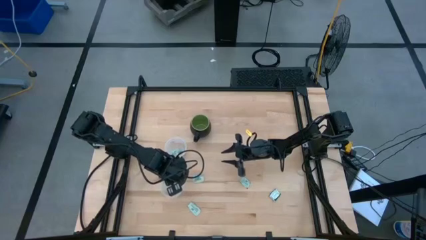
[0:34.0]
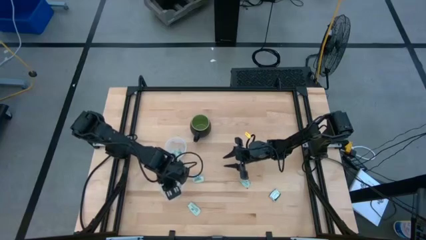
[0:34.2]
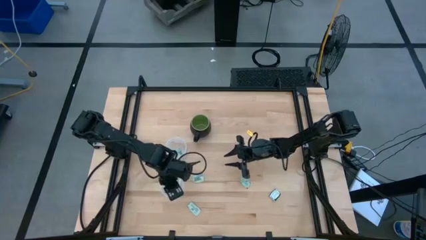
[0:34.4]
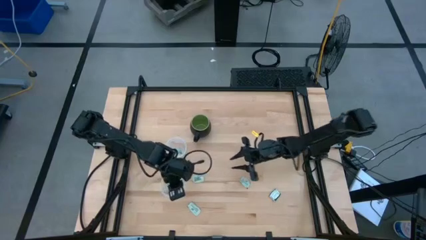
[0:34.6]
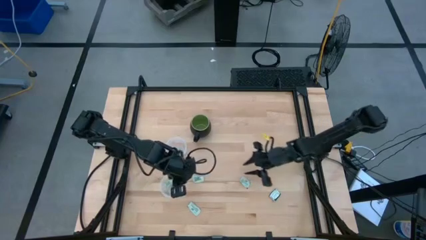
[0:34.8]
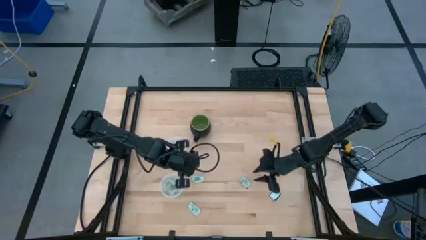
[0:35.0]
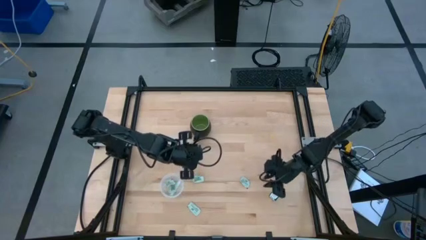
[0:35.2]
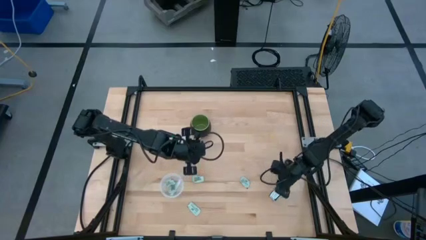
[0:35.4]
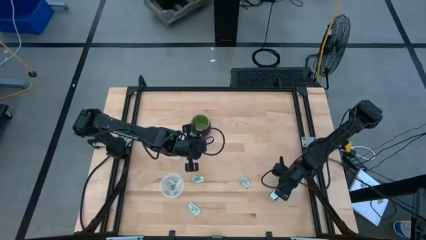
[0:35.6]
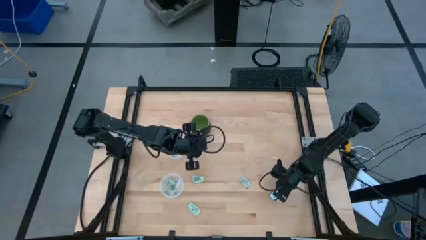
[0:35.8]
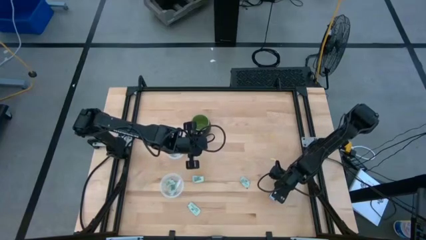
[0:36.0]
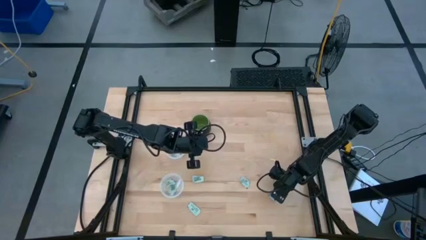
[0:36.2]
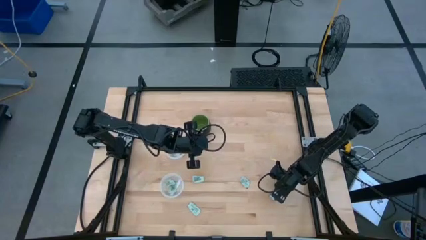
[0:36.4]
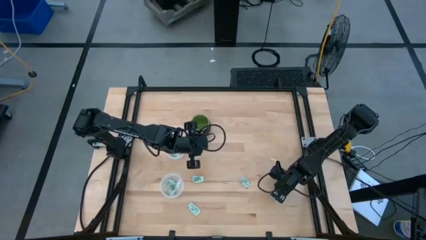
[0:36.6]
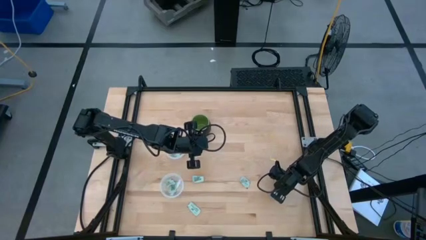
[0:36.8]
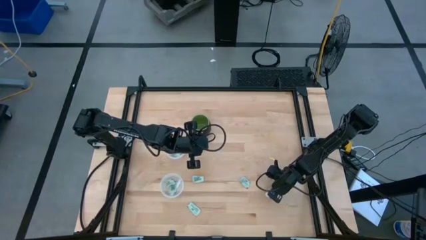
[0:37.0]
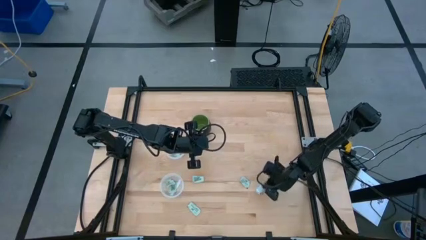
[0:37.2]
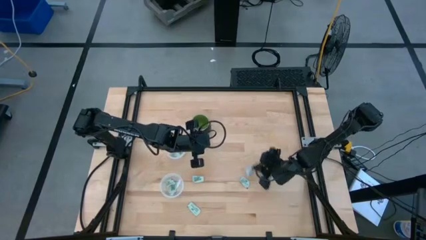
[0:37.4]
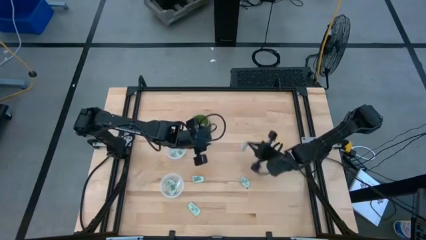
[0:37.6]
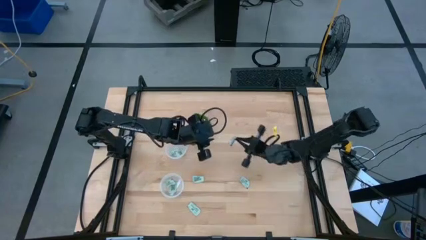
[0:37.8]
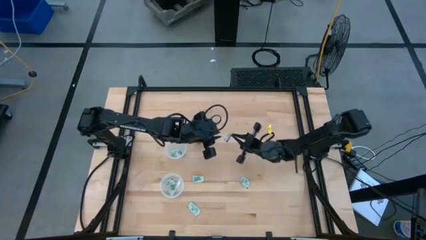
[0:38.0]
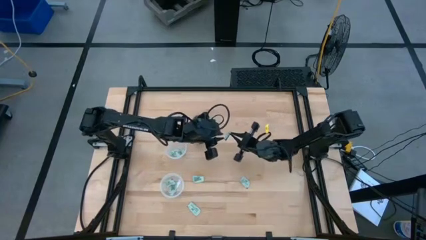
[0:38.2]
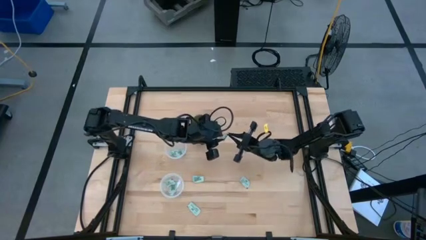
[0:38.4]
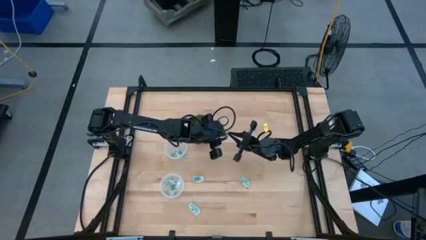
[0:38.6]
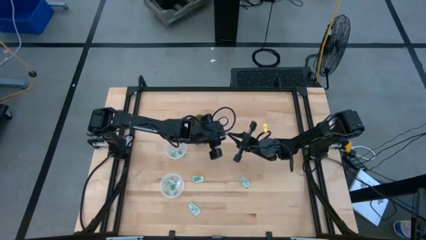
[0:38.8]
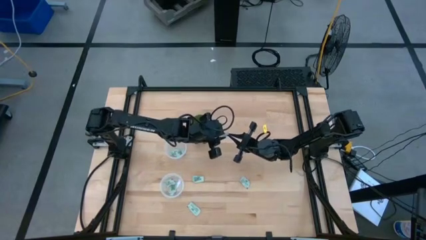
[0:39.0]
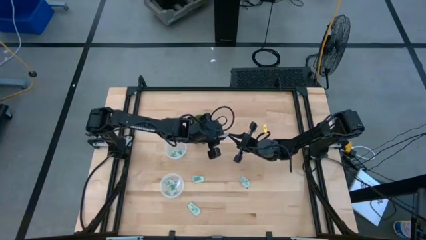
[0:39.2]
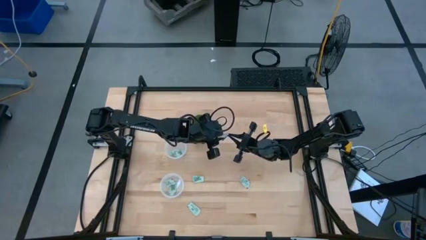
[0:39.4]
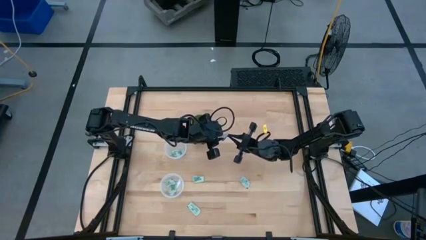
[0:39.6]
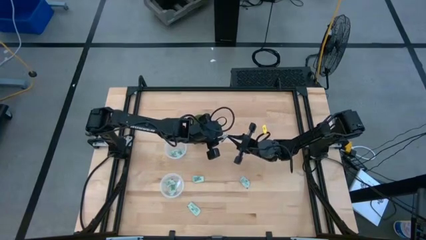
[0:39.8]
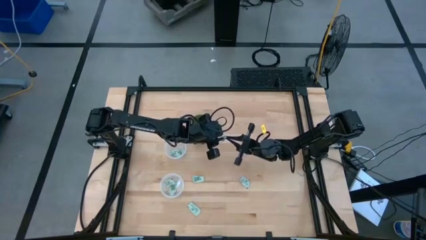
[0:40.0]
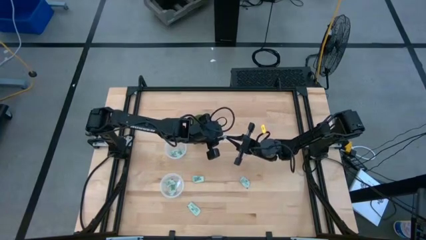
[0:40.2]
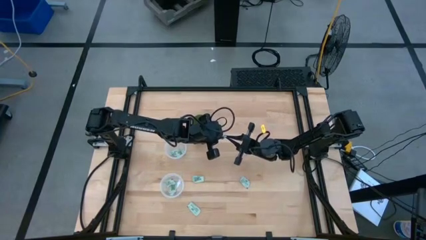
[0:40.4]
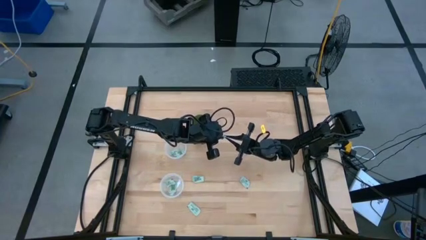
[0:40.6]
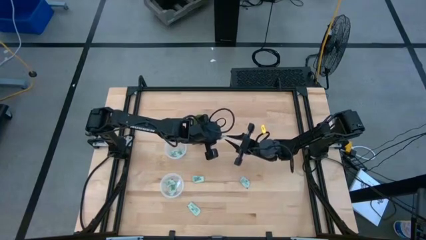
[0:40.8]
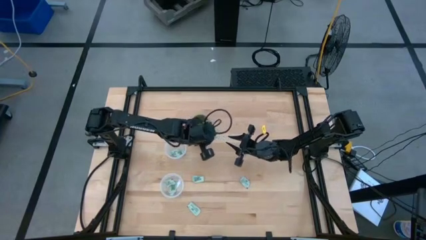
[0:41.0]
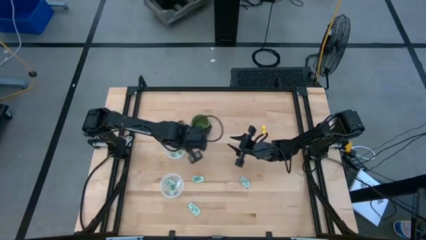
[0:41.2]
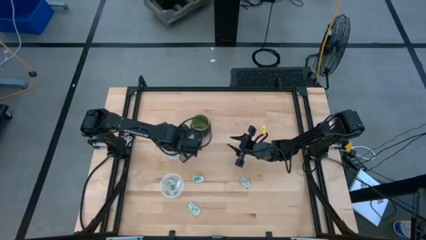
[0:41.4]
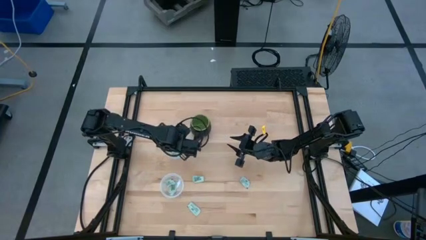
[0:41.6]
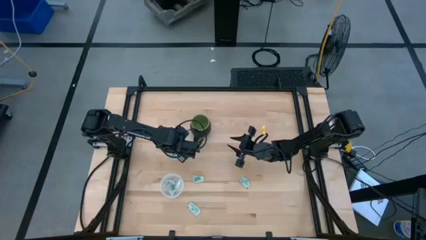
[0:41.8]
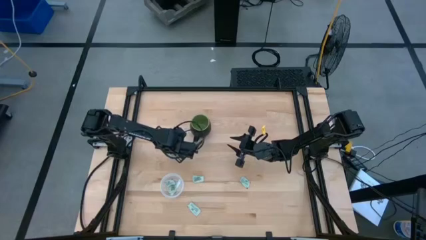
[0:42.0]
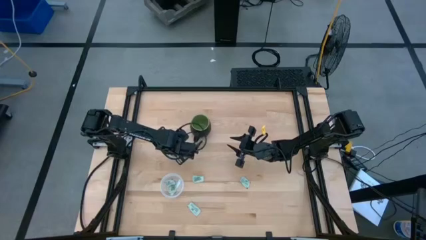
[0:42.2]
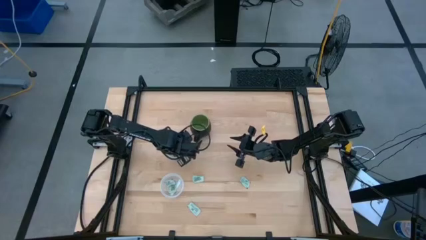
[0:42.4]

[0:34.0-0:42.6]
Task: Pick and place Stevia / Truvia into bins
Put the dark green truvia packet into the top transparent container

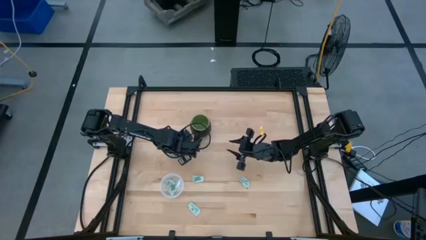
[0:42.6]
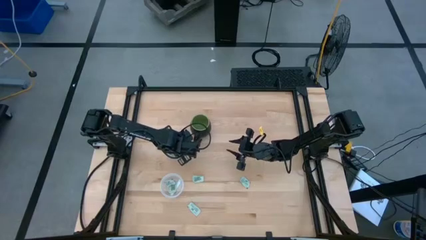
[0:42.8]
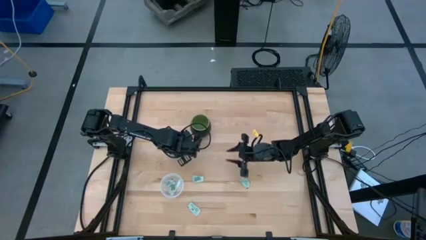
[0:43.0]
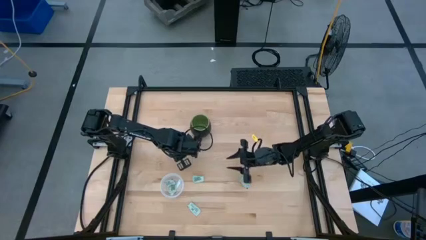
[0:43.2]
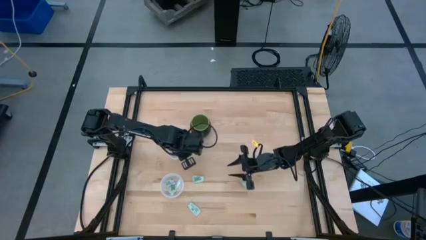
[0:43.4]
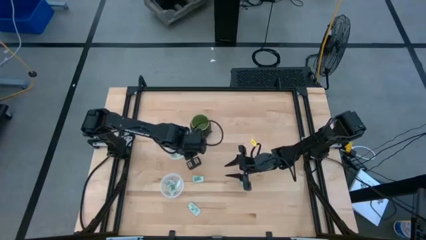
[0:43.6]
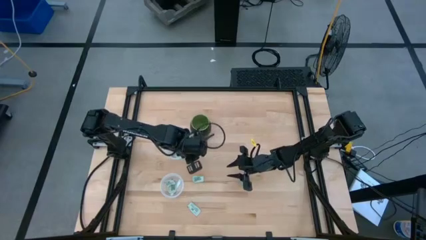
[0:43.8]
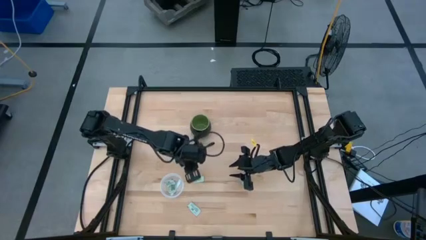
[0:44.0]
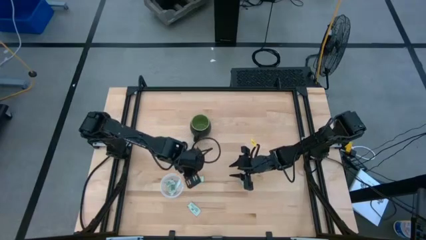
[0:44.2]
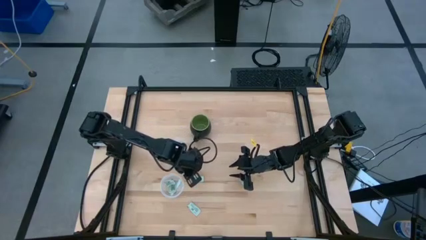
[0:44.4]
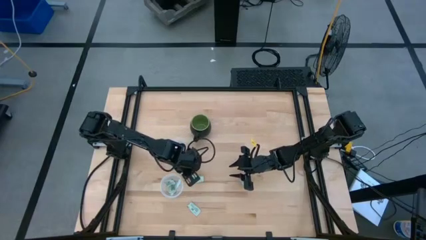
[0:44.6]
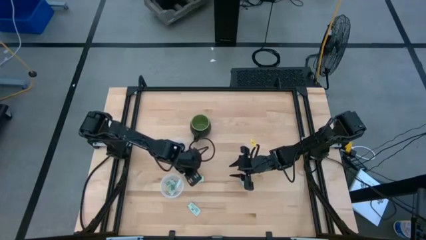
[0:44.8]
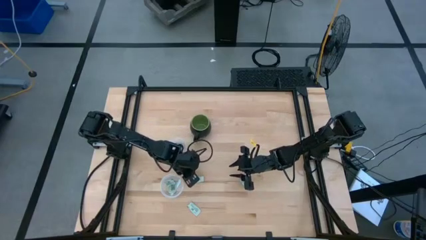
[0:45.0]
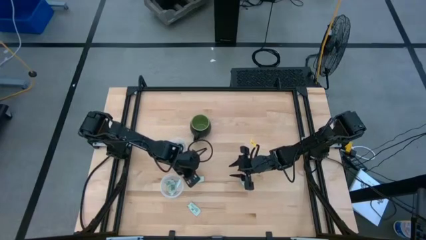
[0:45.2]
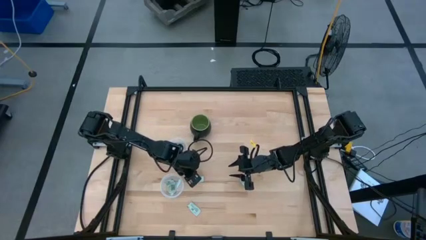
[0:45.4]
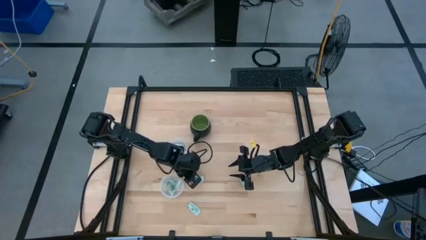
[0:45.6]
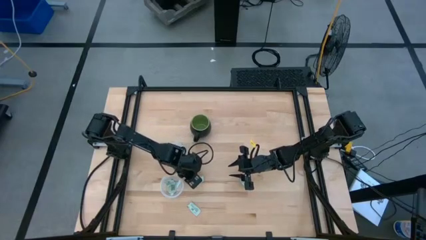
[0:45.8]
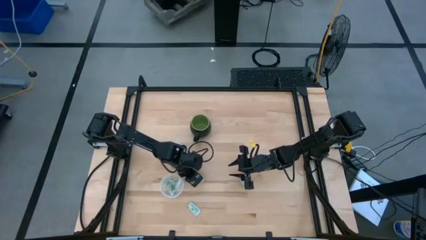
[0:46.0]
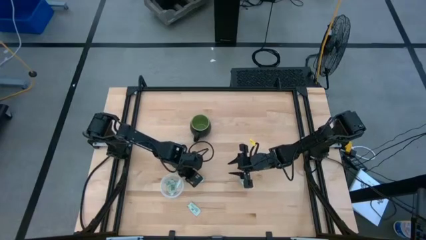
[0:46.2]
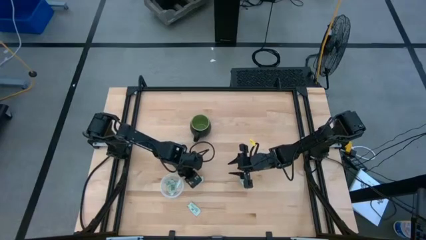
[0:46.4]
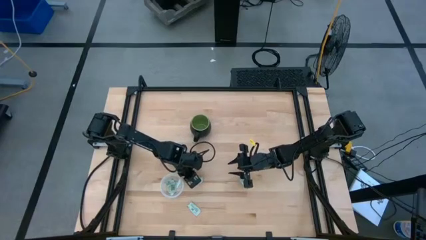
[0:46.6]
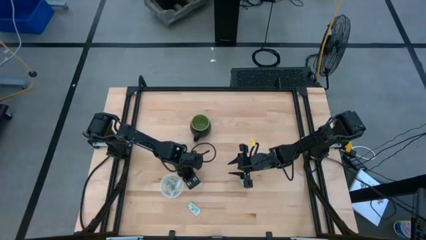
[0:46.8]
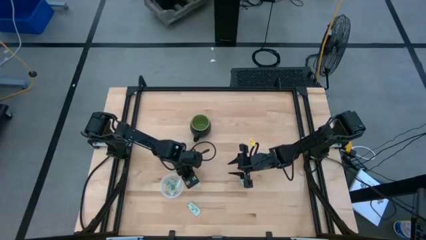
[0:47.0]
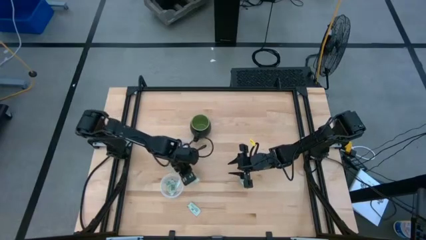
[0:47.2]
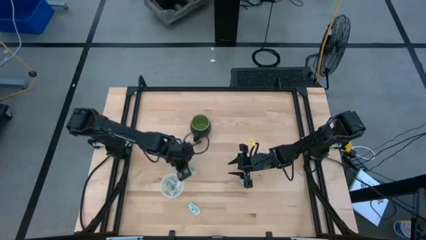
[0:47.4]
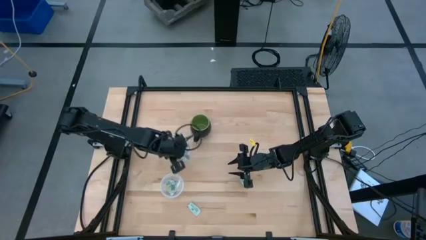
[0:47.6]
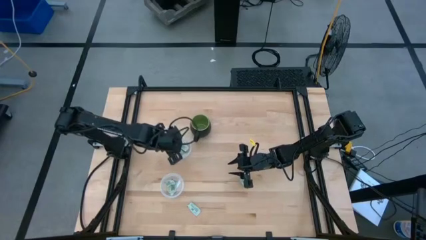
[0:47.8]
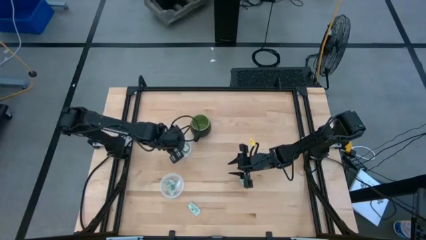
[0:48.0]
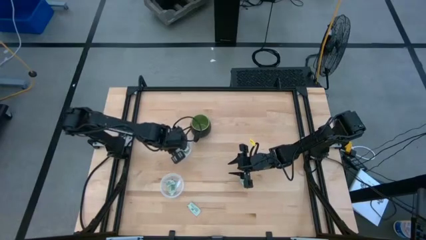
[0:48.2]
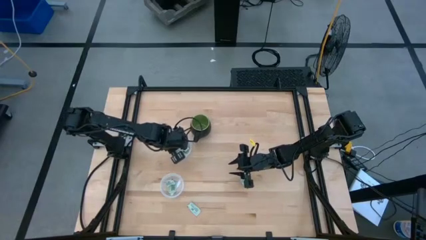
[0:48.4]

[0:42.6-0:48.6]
Put the green stevia packet into the top transparent container

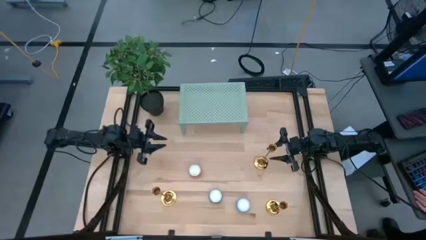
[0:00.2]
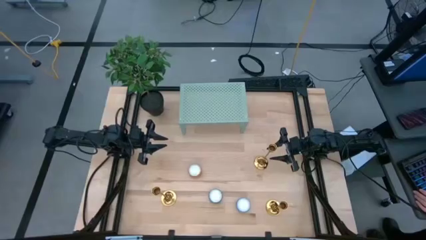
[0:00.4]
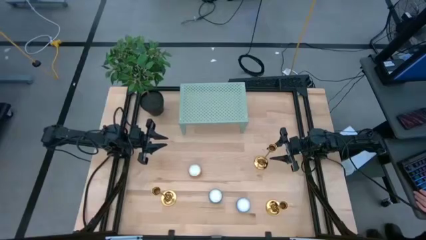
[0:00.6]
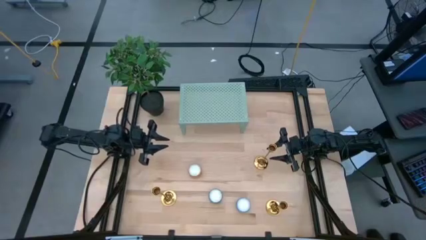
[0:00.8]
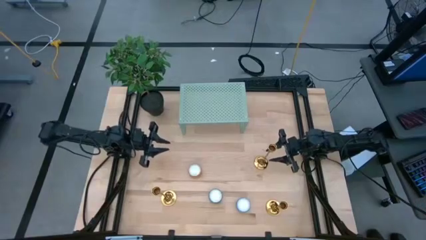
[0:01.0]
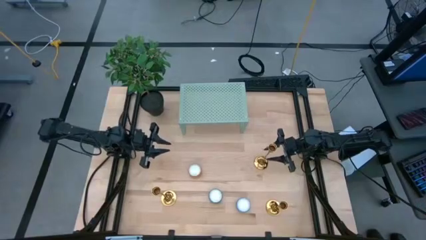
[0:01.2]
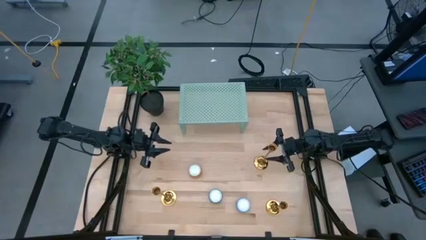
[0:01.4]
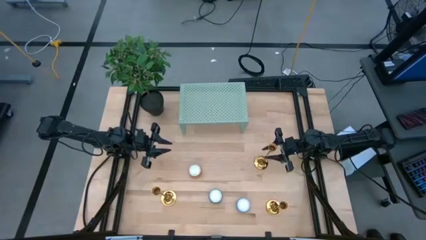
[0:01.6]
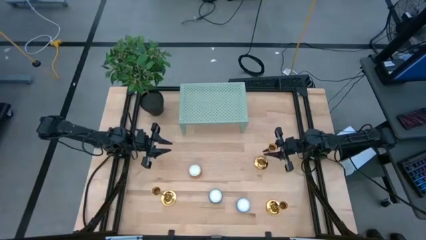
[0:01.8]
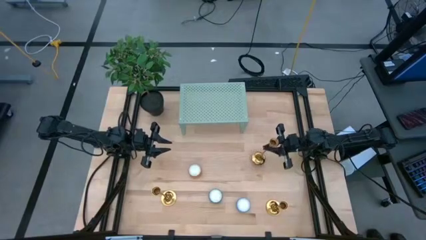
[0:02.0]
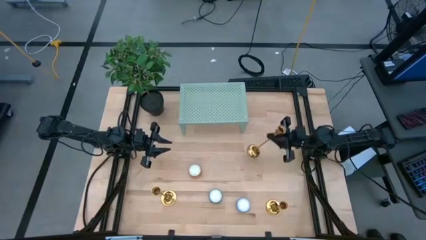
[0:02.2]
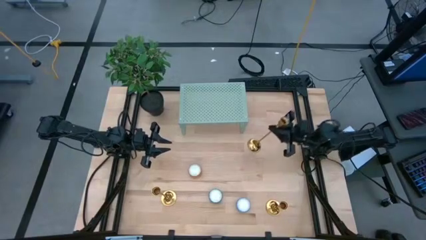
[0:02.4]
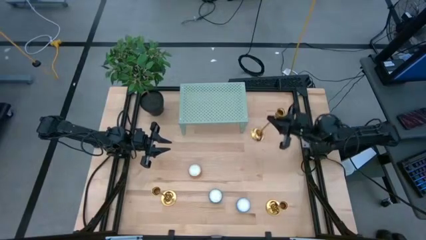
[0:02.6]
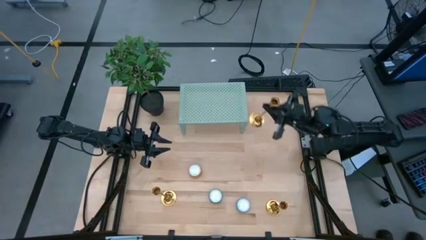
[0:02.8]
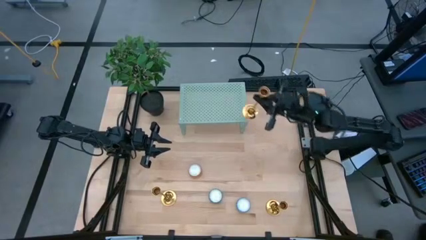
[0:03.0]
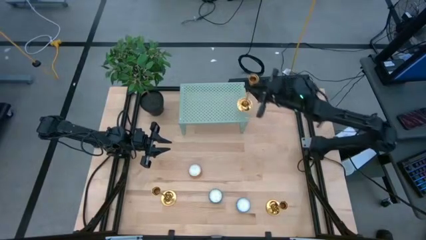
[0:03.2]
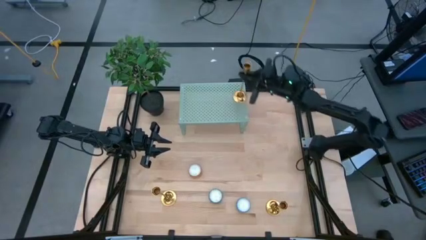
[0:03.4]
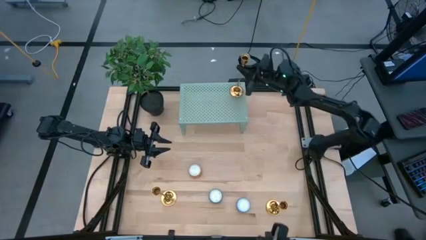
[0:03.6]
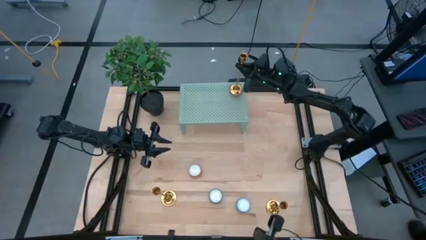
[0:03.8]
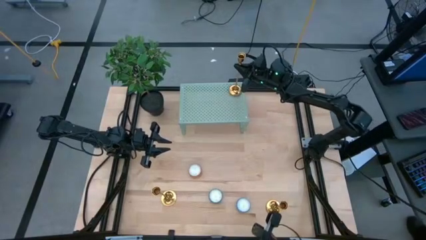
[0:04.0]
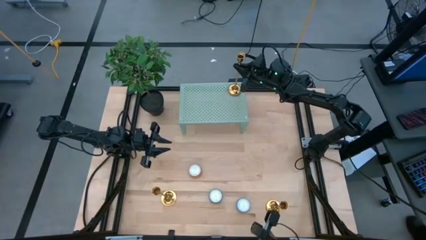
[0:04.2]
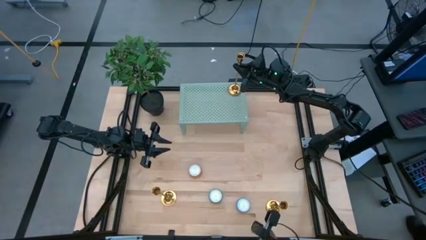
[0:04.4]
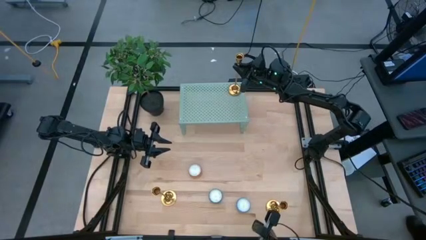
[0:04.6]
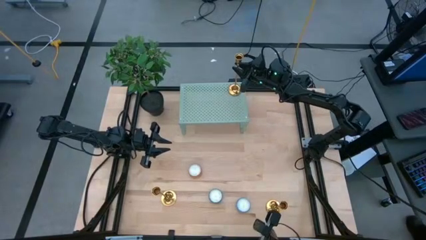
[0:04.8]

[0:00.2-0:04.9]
Task: Pick & Place candle stick holders
Put the top gold candle holder on the shelf
